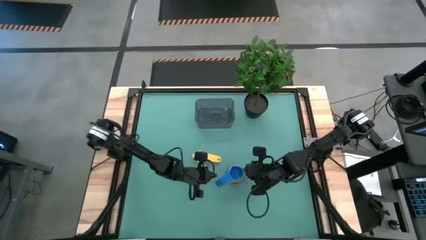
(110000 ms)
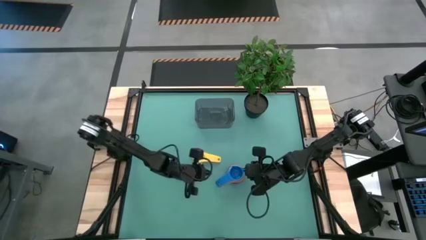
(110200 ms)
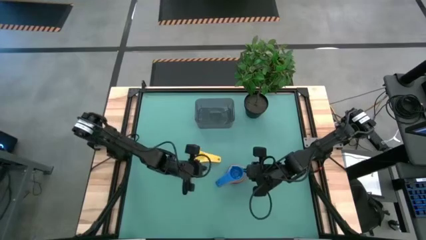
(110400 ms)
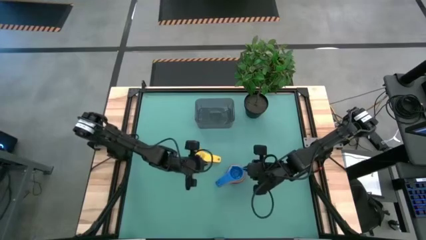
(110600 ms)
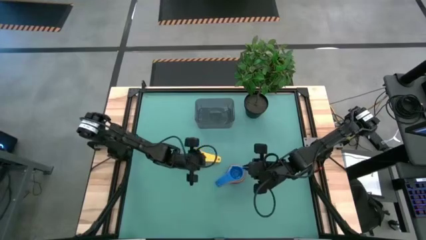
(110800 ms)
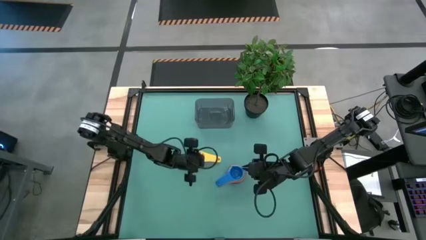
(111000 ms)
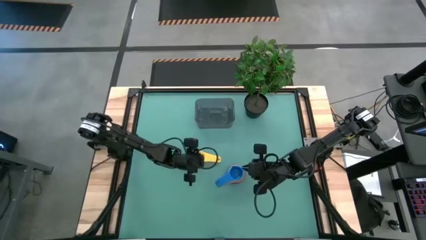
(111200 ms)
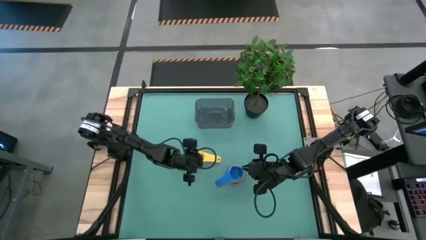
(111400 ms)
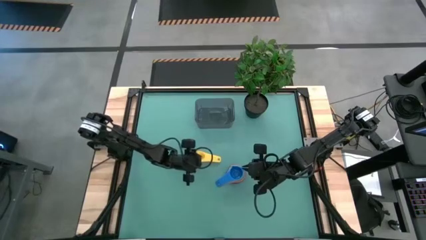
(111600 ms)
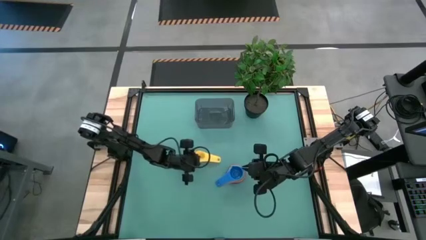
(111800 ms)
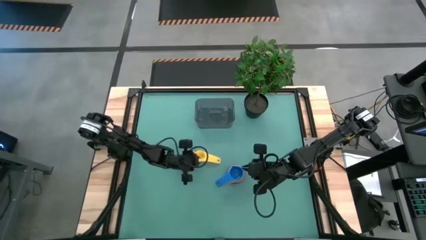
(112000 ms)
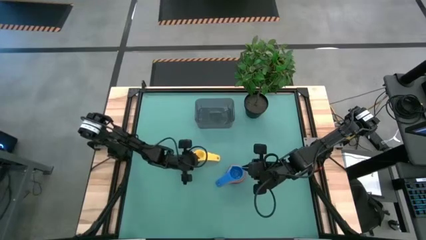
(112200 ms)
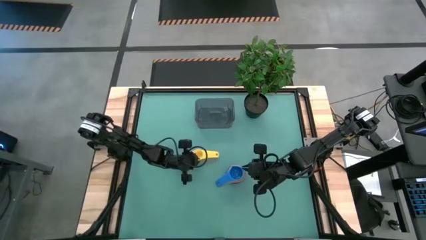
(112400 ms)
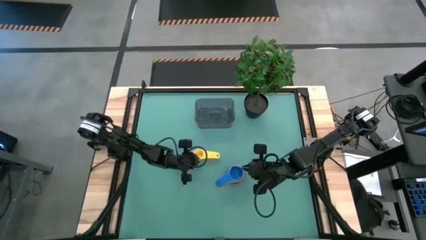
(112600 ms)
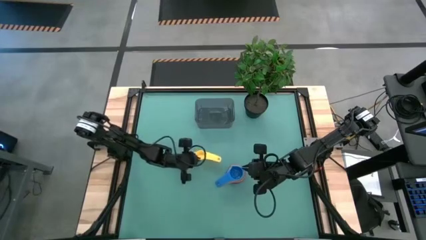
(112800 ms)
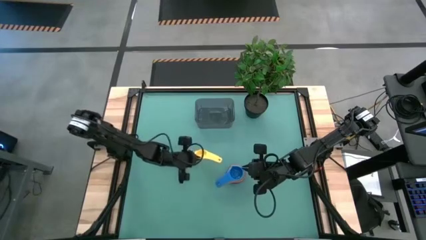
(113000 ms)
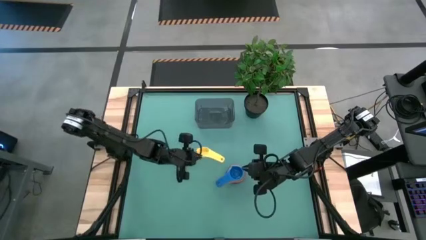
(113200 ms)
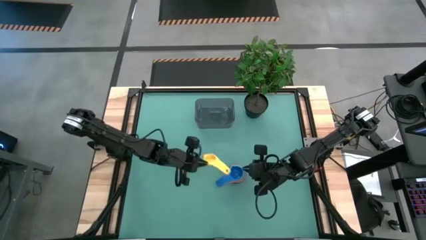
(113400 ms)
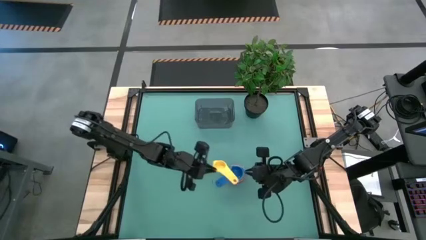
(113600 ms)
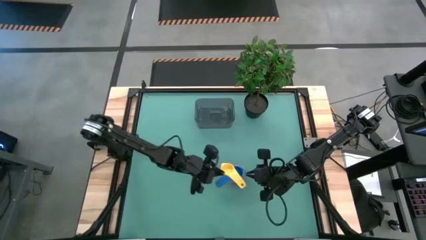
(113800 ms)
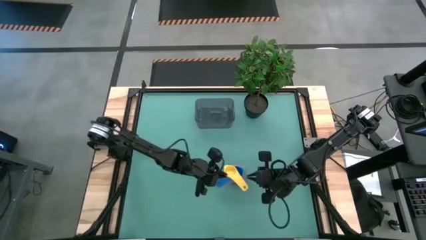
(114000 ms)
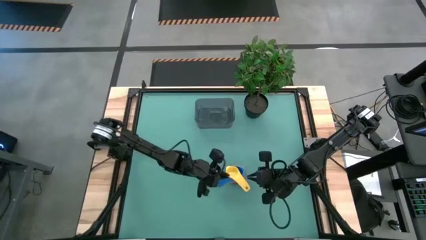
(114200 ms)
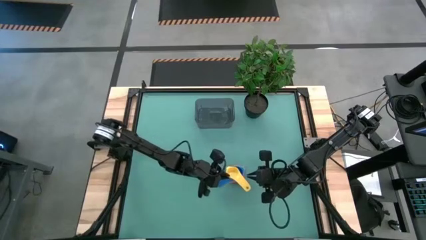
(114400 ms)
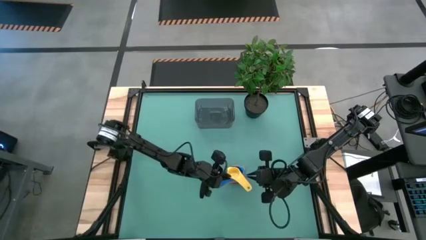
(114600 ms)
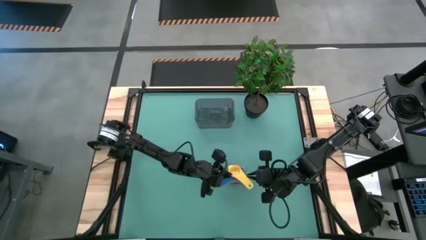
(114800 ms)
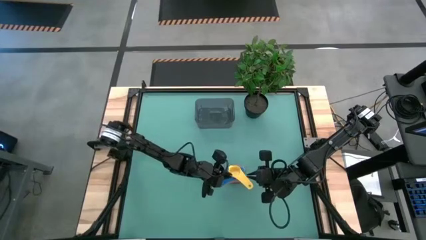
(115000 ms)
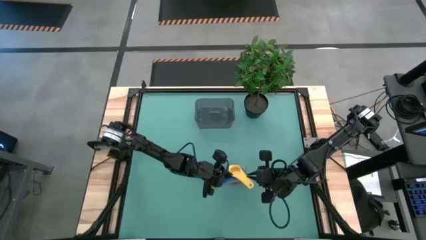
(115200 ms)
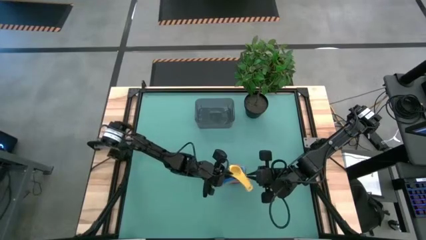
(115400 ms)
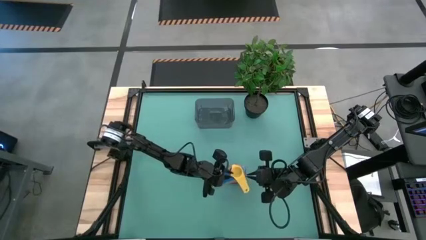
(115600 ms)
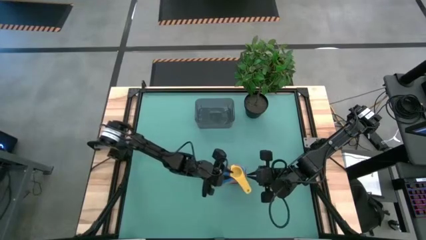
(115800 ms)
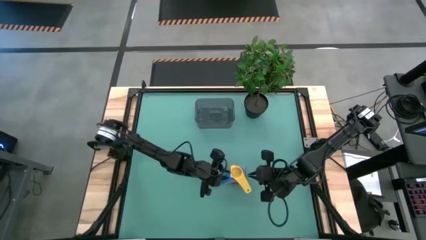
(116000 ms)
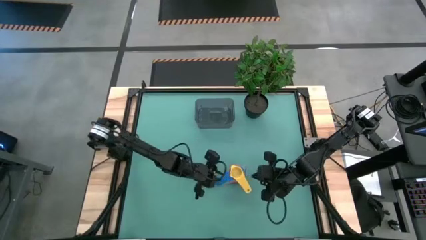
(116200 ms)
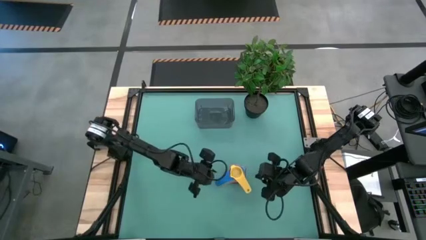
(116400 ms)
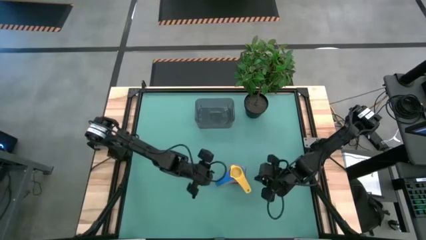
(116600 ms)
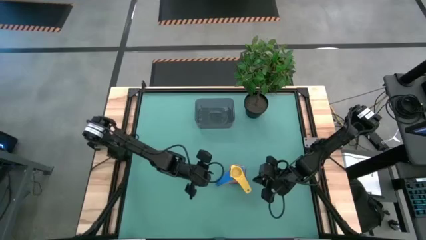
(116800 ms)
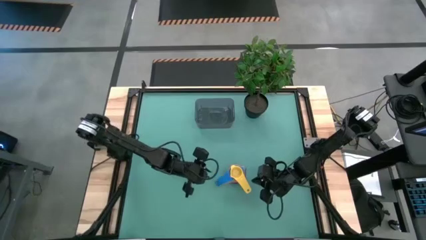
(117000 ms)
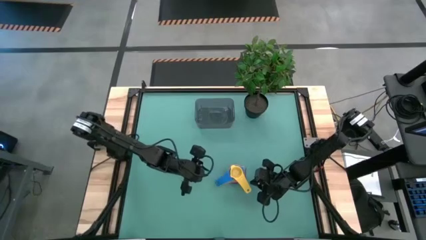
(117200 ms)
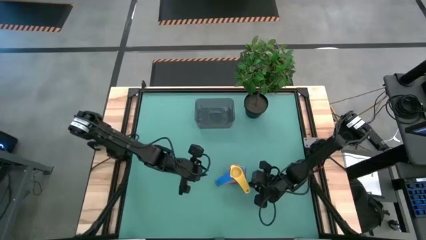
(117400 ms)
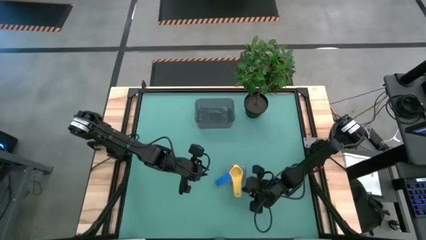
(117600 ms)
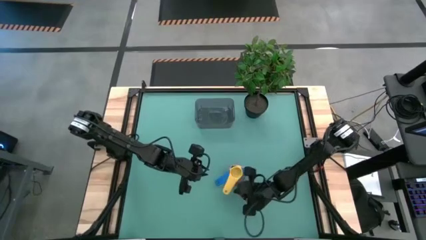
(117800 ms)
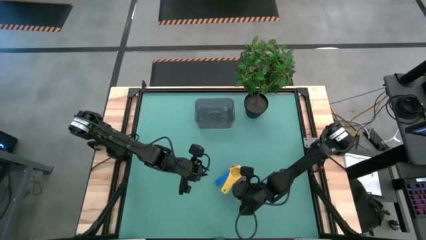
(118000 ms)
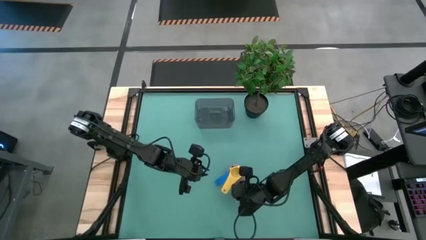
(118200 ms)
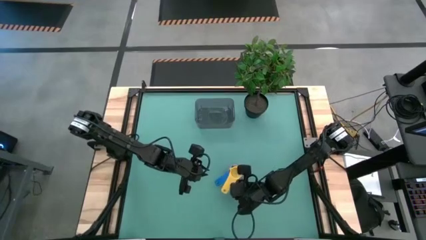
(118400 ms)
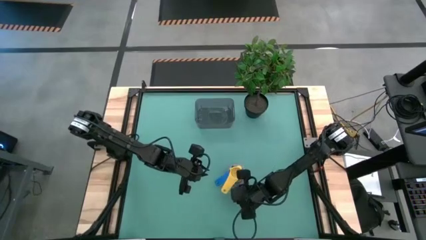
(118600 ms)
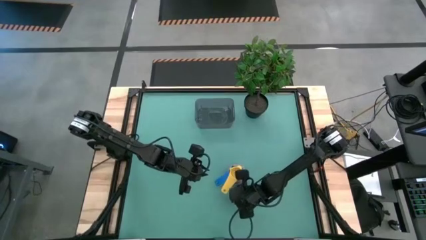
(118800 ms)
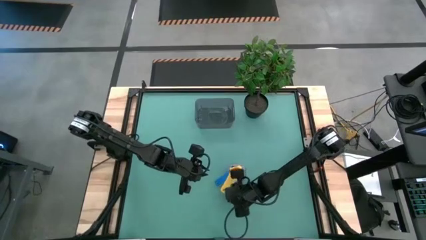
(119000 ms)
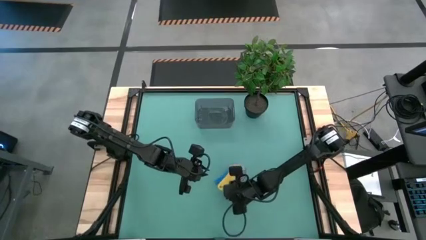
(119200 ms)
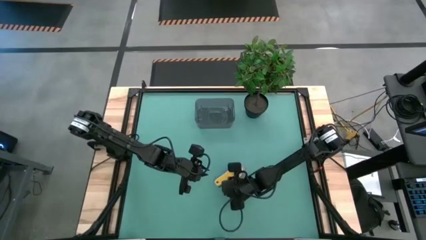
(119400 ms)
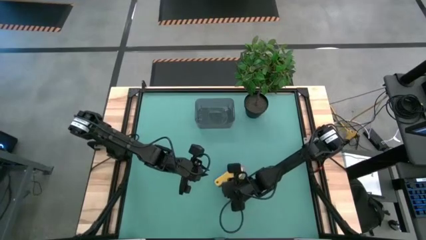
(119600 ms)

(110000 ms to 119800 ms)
Task: Nest measuring cups in basket
Stack the yellow measuring cup into the blue measuring cup

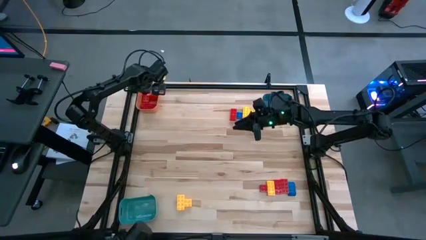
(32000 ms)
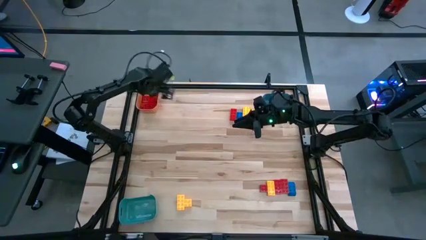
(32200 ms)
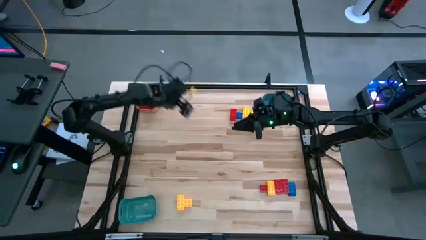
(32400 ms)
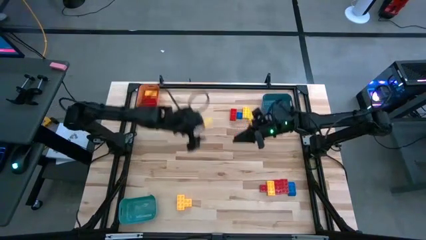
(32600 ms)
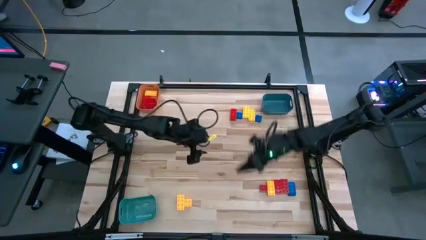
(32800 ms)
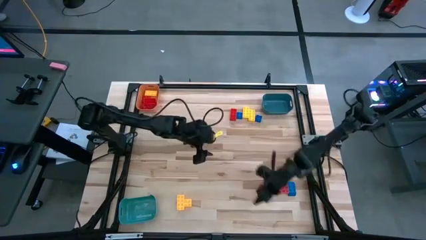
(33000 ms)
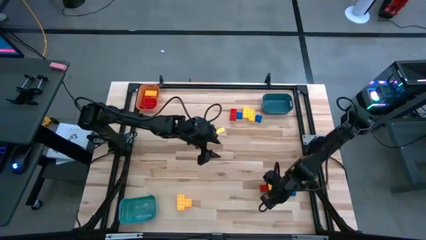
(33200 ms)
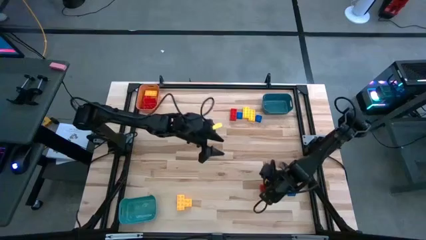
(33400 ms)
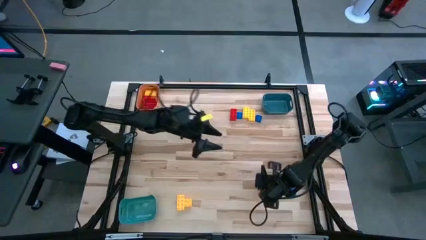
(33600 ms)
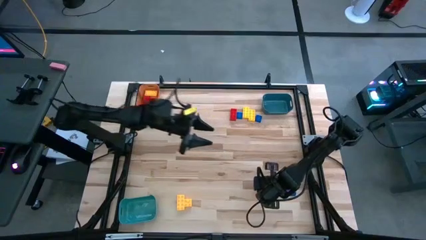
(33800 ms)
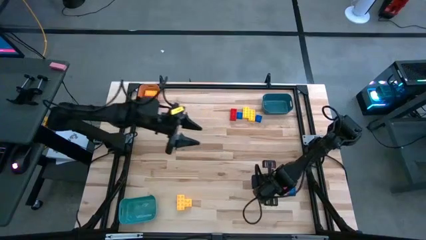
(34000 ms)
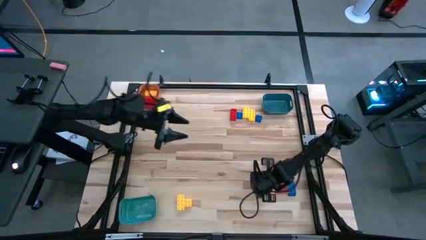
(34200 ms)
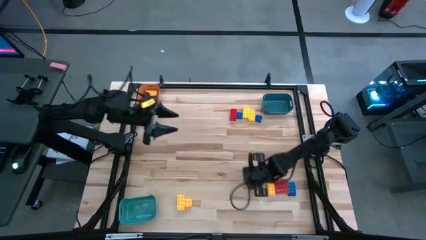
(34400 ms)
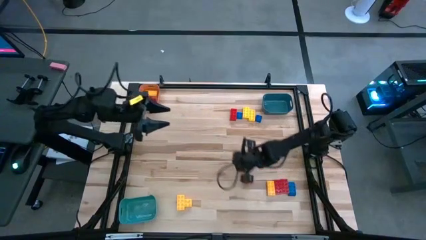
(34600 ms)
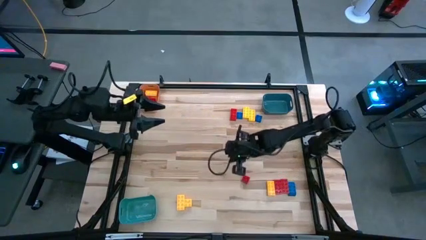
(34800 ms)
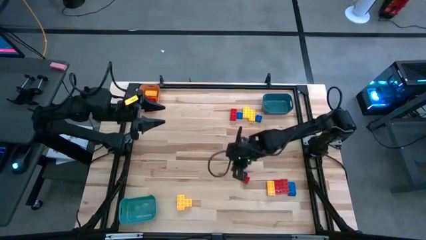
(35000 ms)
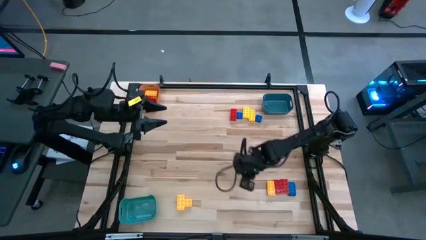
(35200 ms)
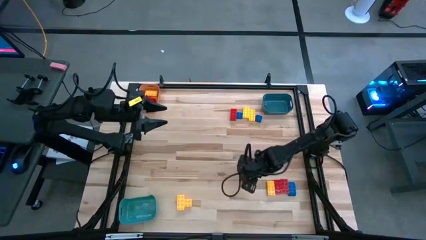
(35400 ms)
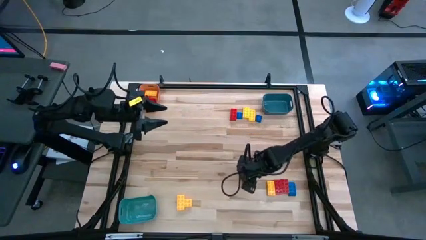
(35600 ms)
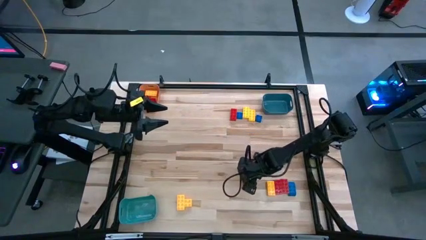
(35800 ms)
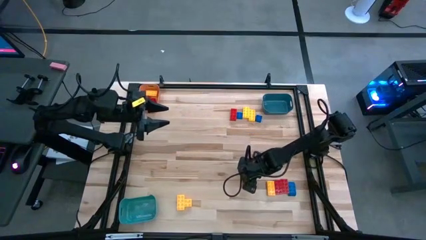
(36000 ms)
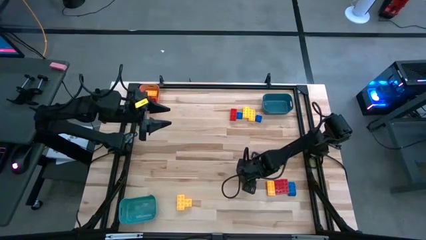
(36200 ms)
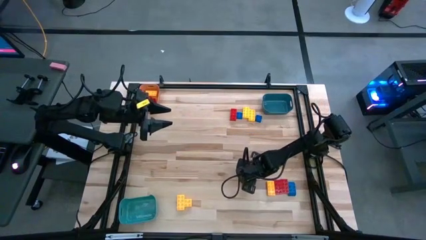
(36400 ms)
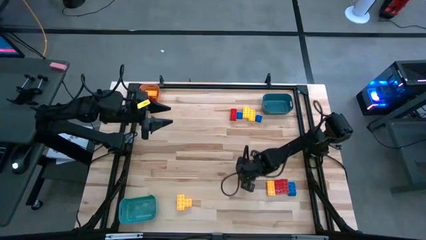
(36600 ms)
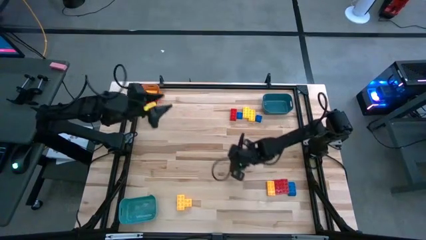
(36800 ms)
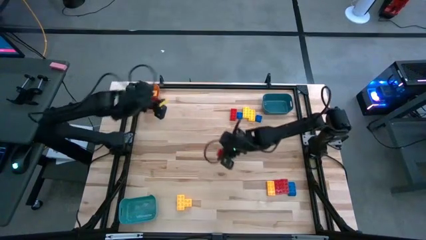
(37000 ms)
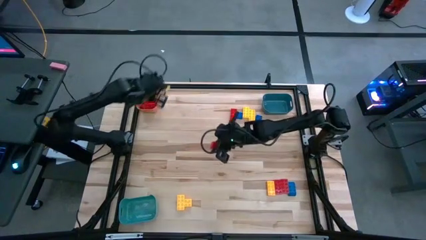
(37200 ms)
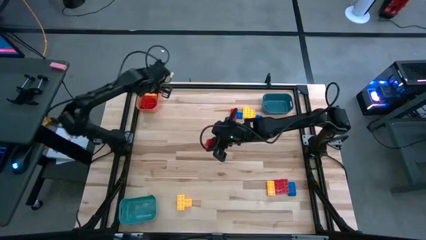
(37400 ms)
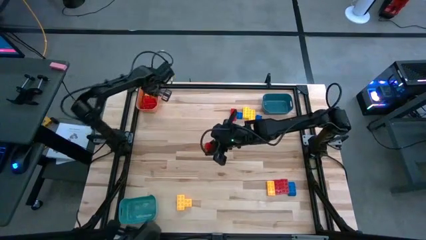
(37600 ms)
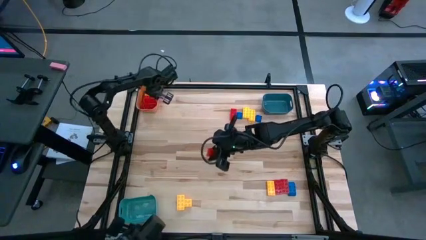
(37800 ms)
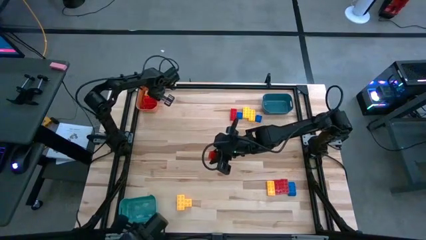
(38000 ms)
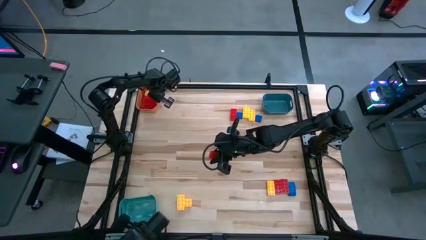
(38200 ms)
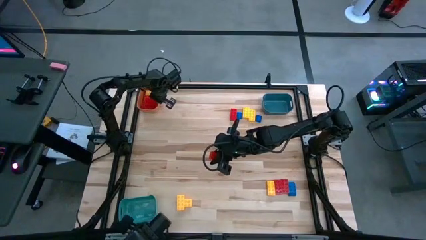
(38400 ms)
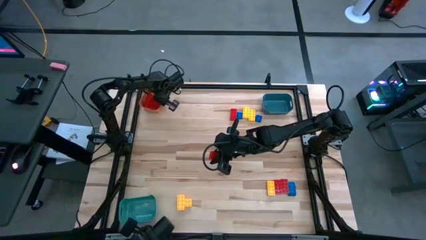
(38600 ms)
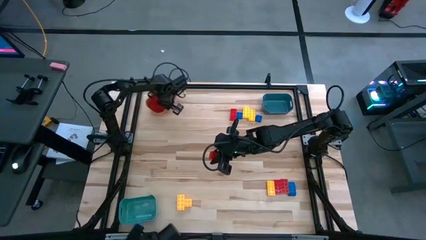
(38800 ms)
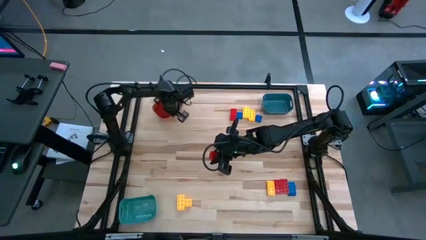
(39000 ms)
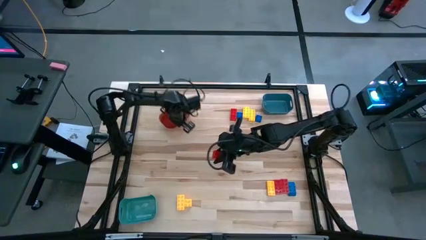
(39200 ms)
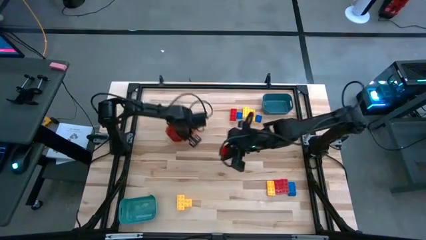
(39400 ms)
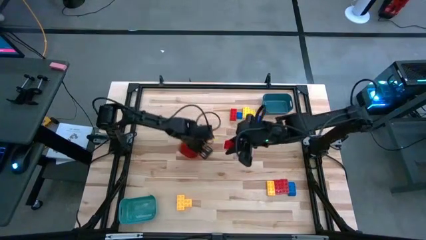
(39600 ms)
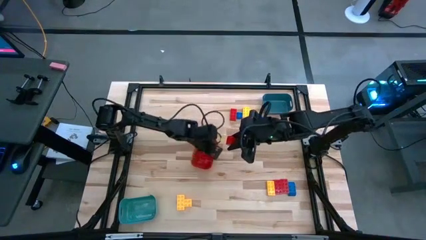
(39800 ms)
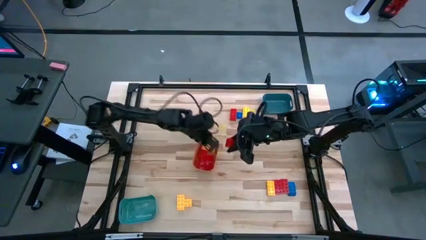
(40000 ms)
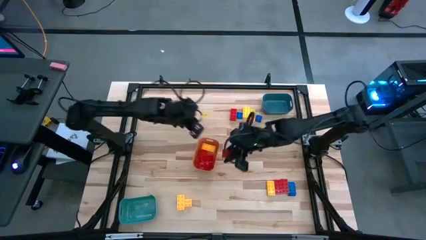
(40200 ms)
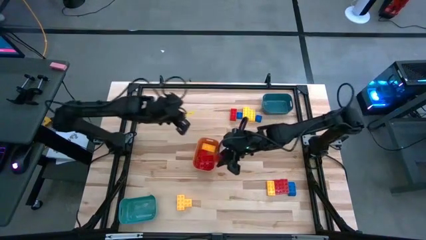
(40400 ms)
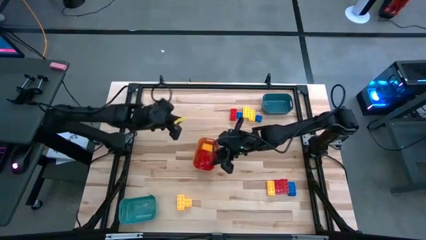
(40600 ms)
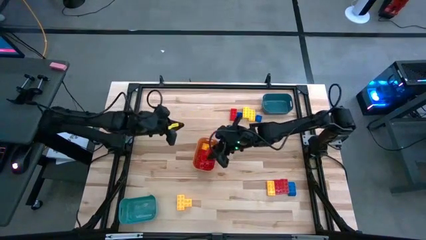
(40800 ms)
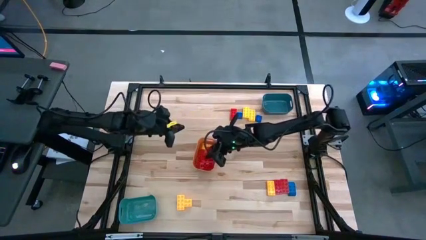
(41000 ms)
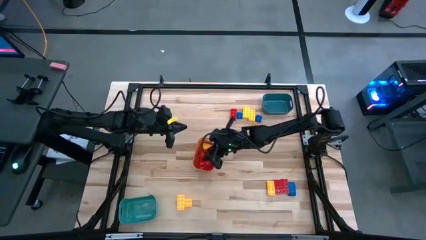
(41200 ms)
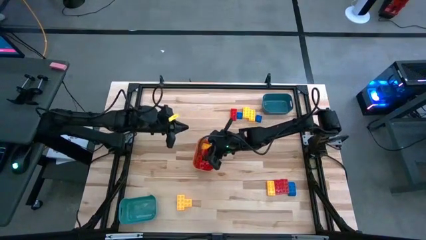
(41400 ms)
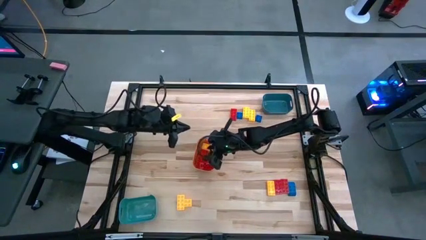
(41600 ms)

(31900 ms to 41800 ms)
Task: Sort blocks
Put the red game piece into the orange bin
